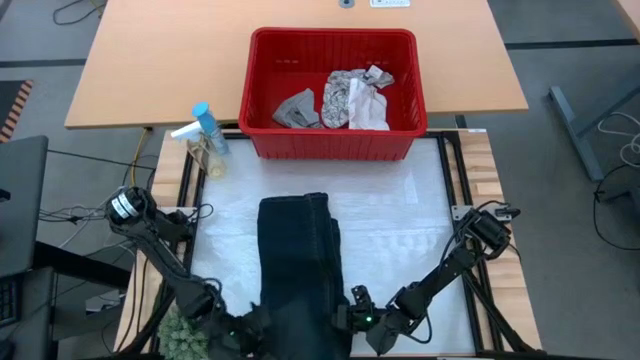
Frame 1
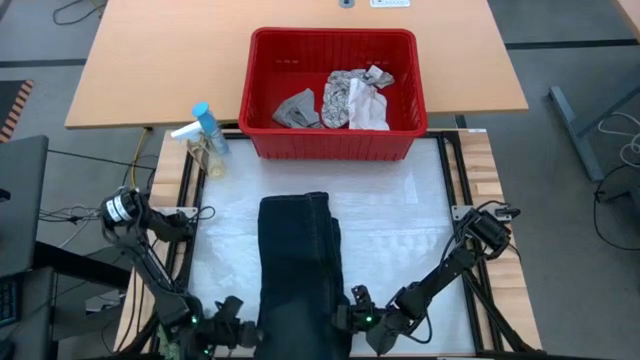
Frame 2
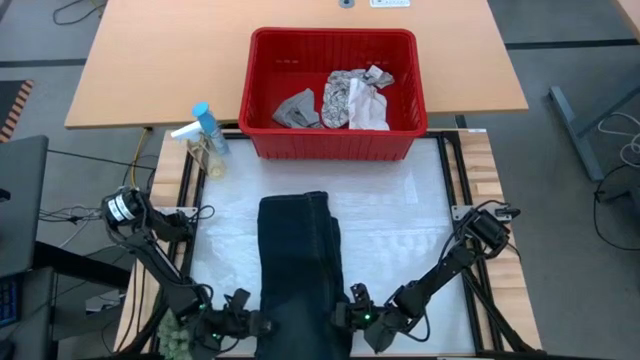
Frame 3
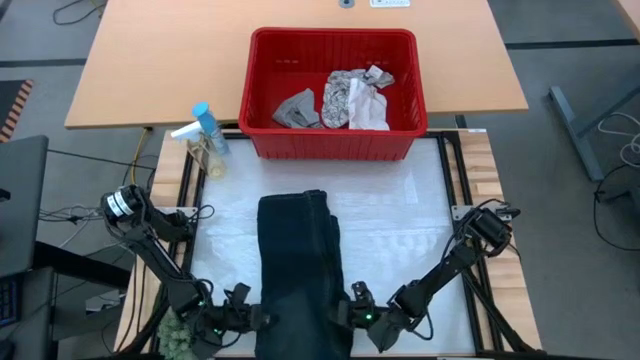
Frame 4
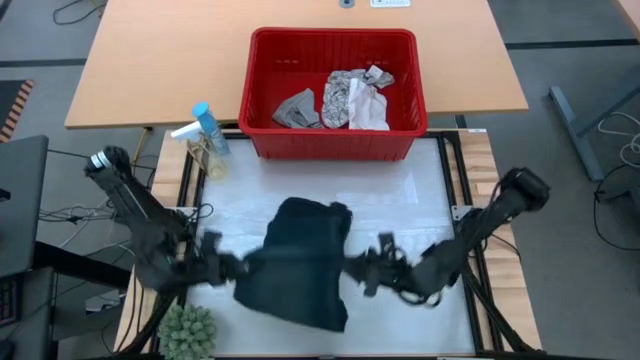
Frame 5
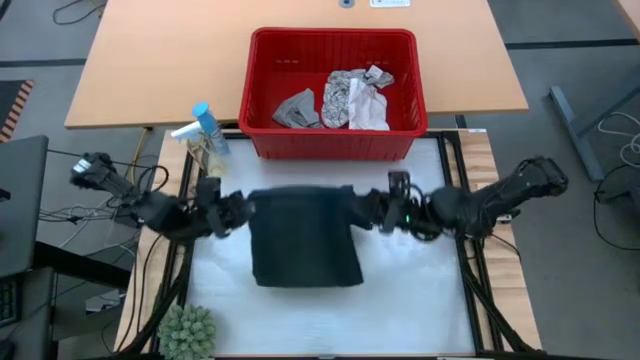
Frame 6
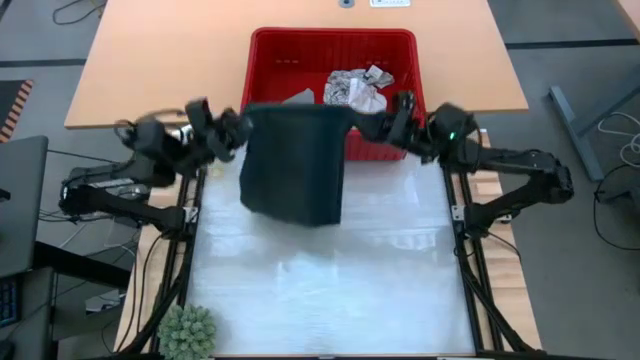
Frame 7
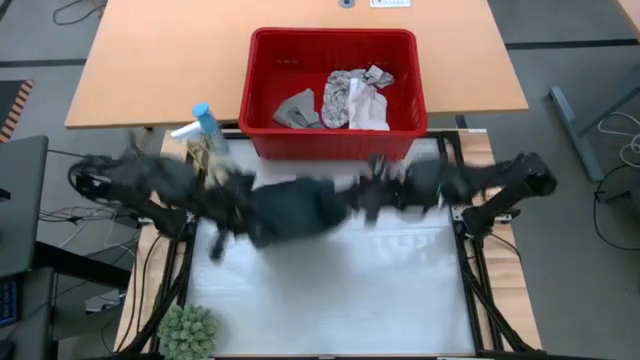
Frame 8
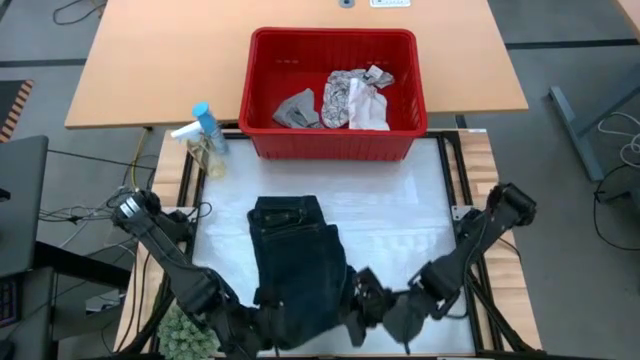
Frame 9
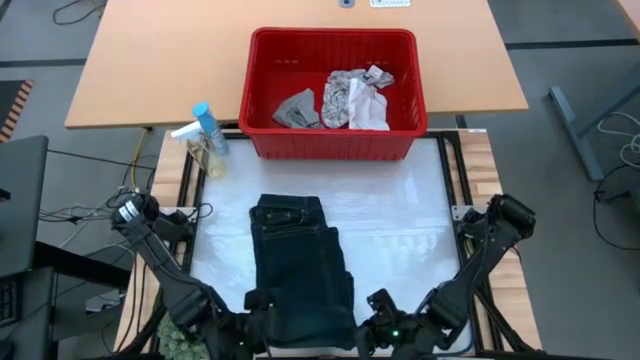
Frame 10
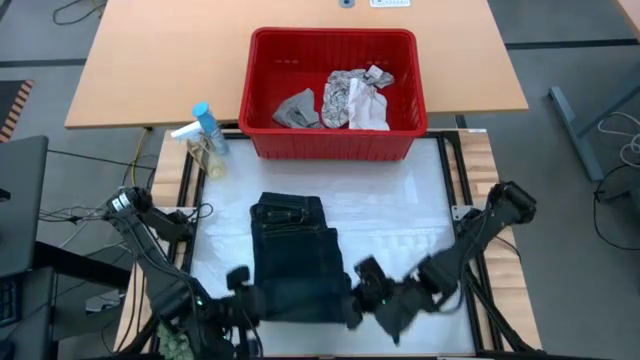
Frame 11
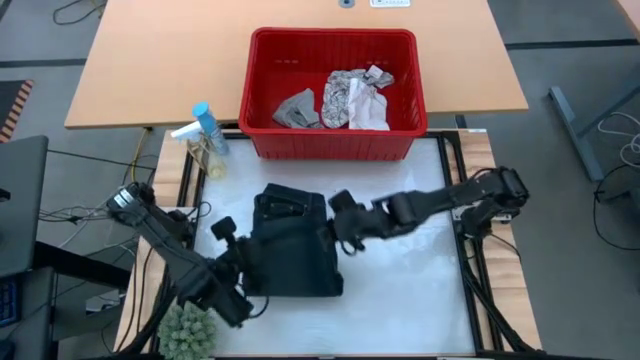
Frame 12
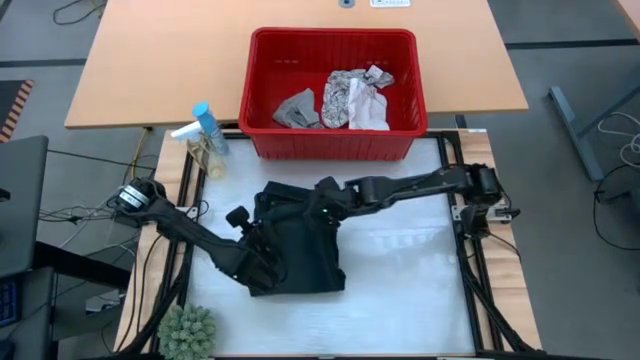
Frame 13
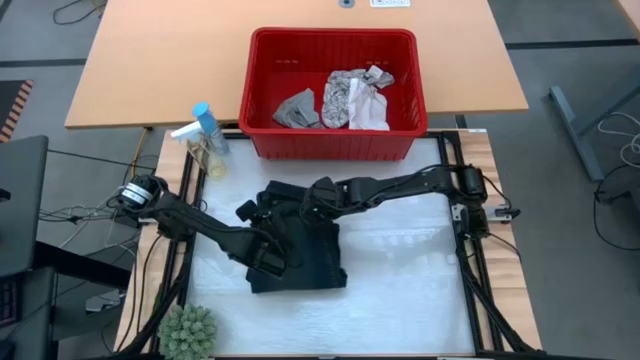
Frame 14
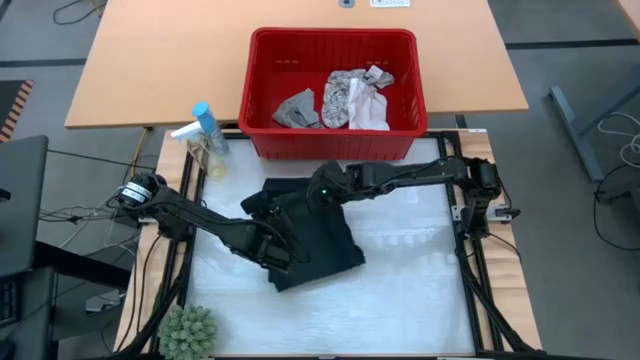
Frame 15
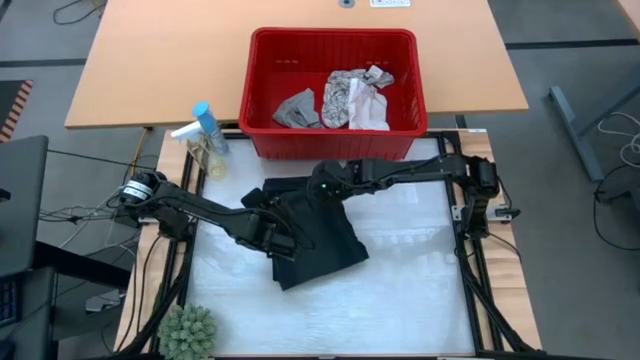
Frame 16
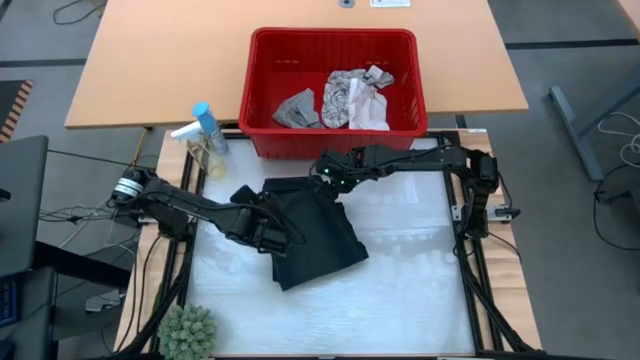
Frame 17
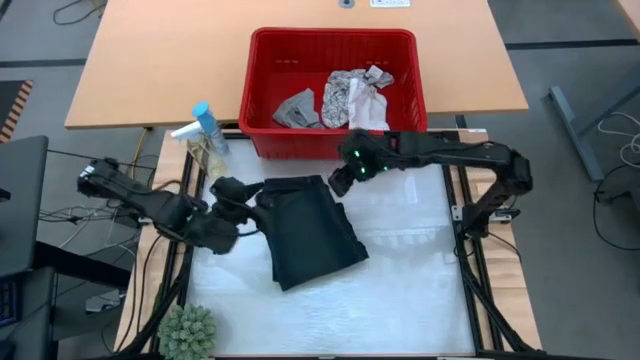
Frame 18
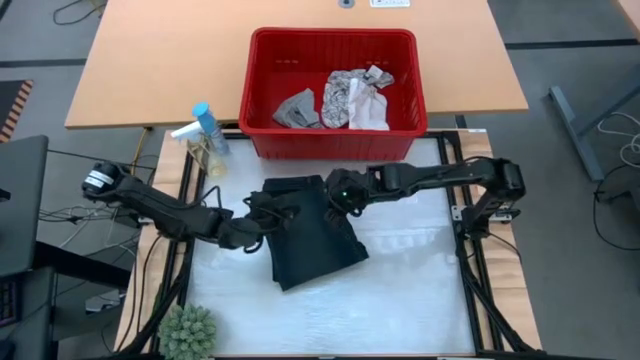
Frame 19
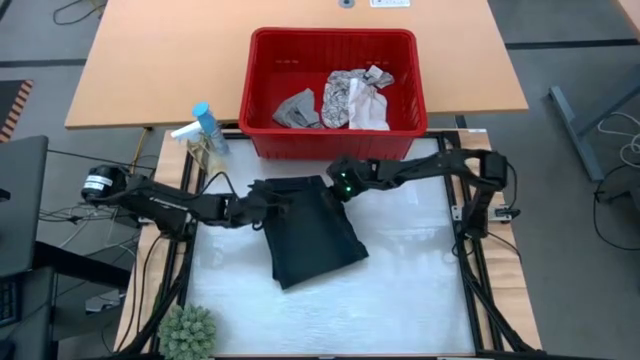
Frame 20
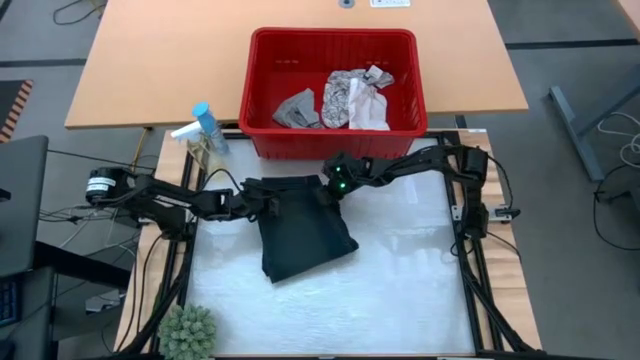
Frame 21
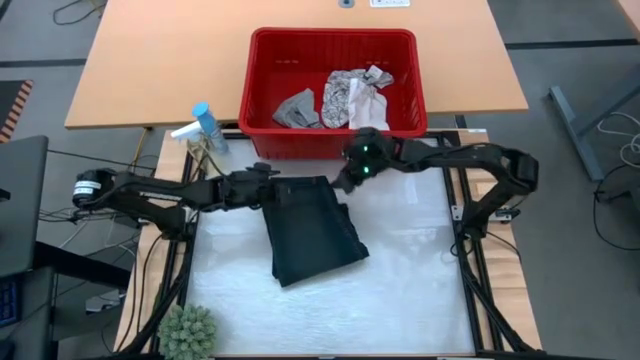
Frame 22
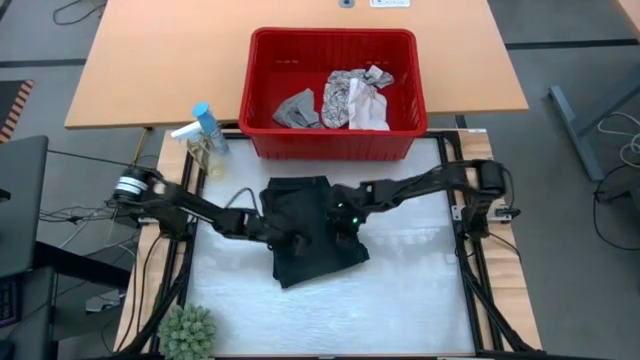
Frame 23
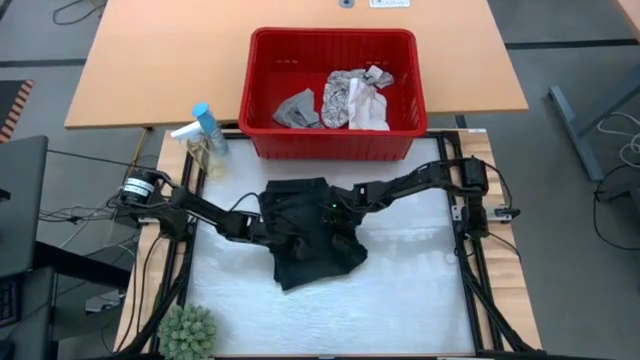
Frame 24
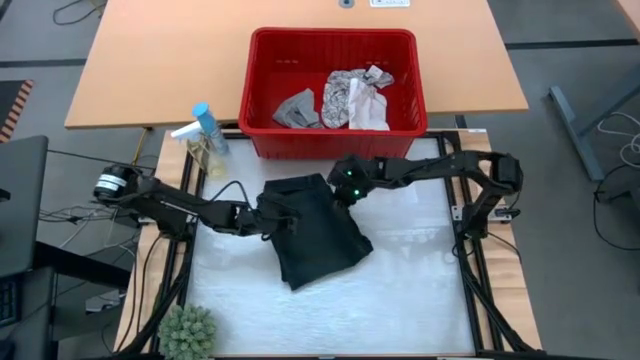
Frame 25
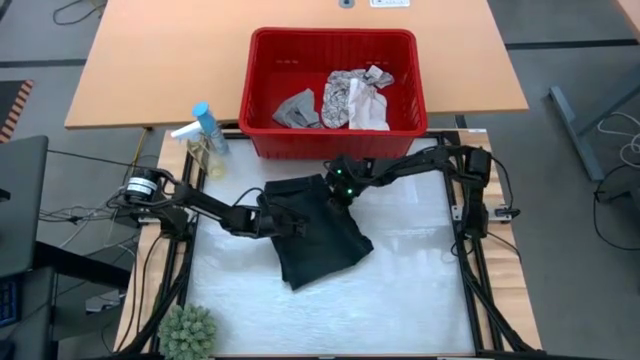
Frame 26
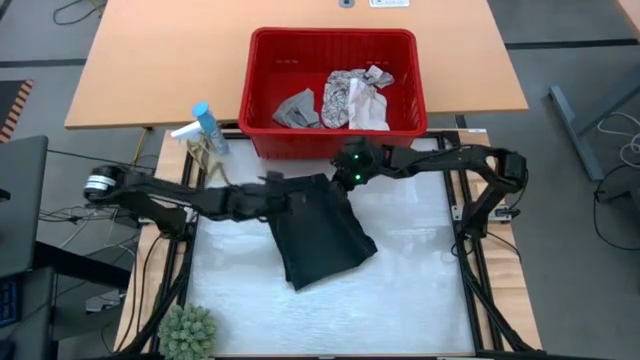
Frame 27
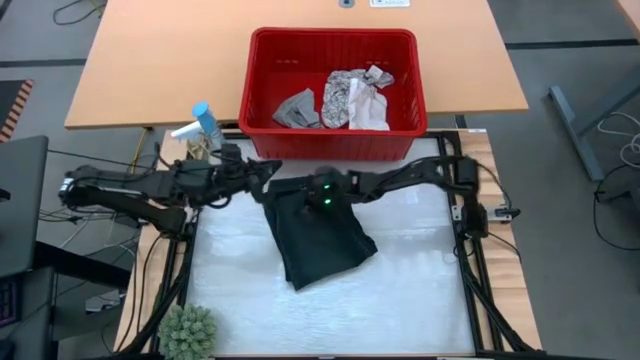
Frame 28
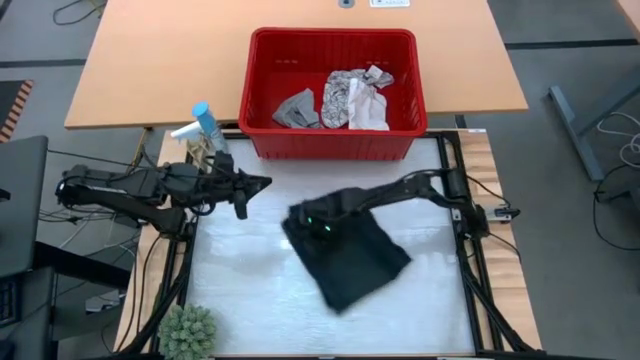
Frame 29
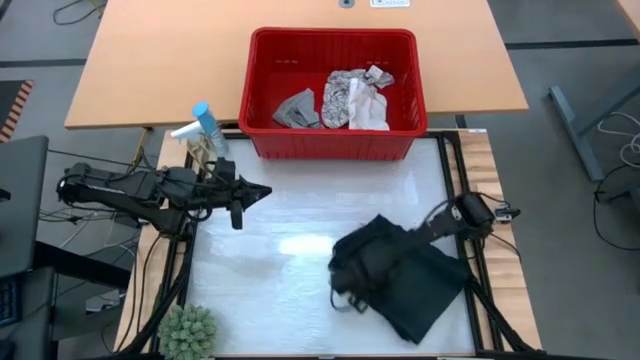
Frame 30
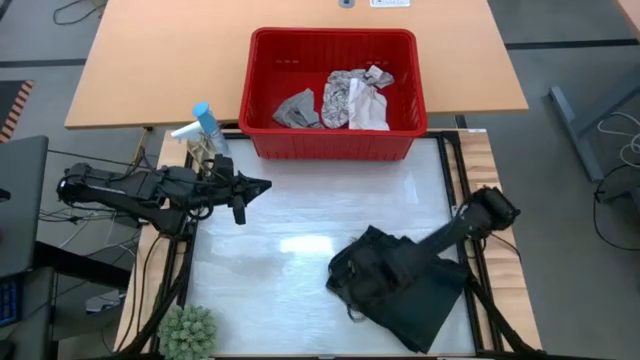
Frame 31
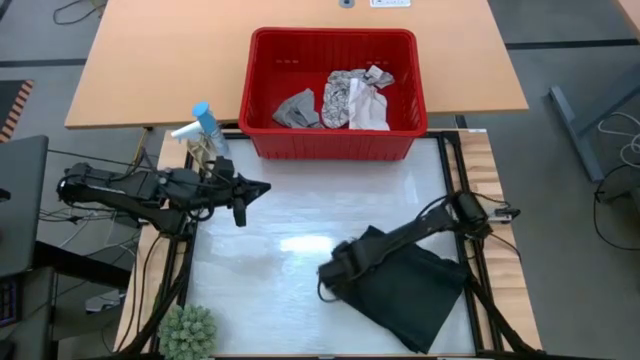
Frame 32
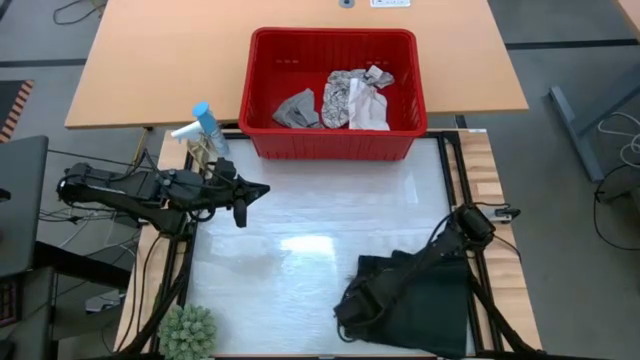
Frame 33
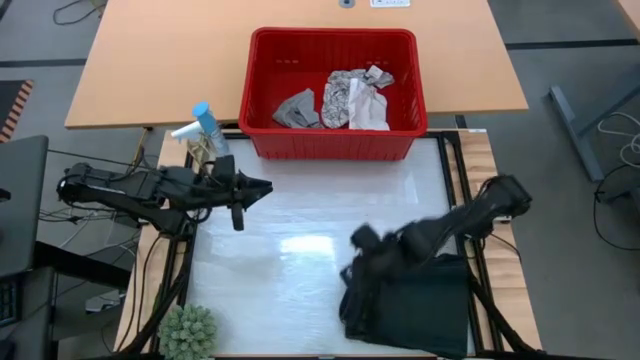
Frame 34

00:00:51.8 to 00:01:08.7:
Task: Fold Laundry from Bin
Fold the blue pants from the red laundry bin

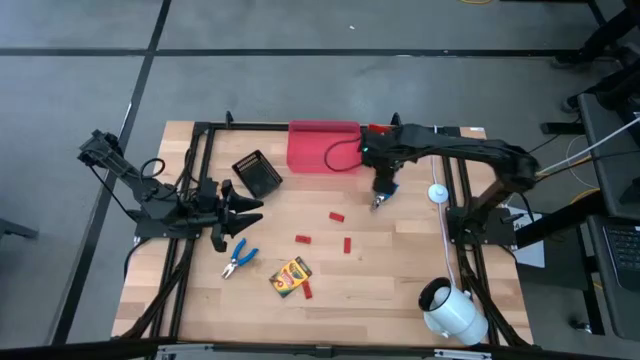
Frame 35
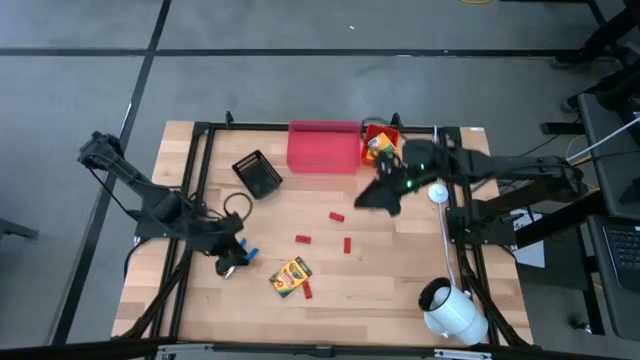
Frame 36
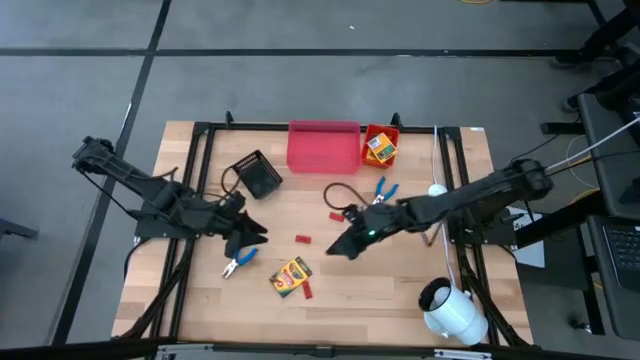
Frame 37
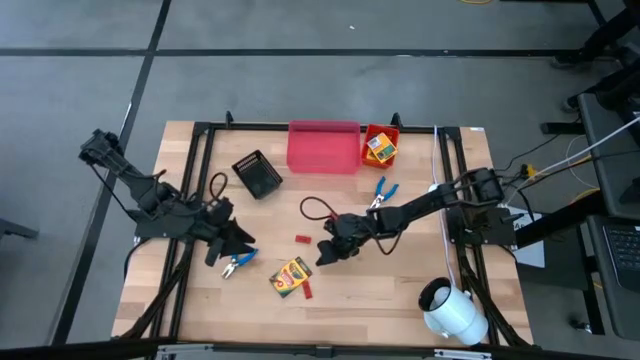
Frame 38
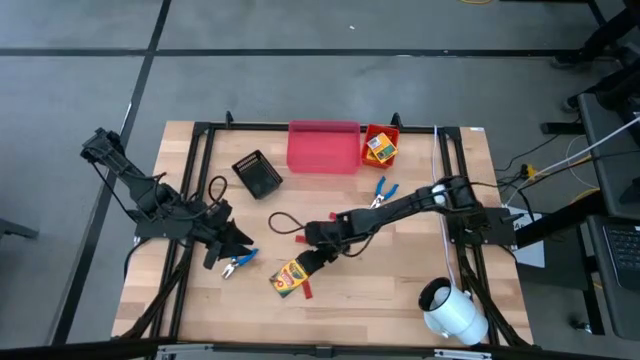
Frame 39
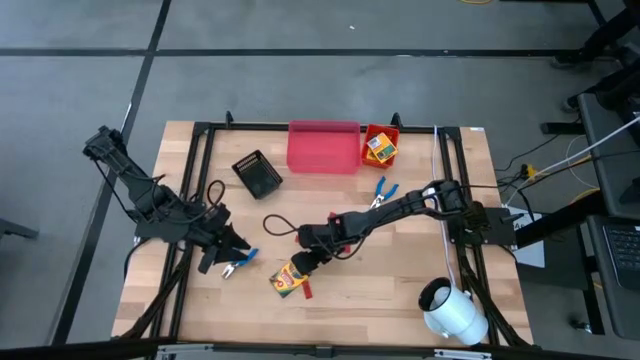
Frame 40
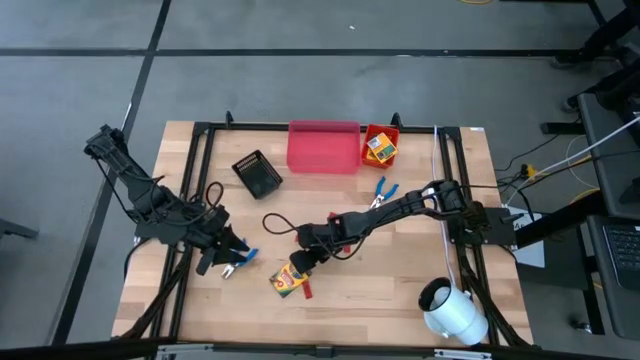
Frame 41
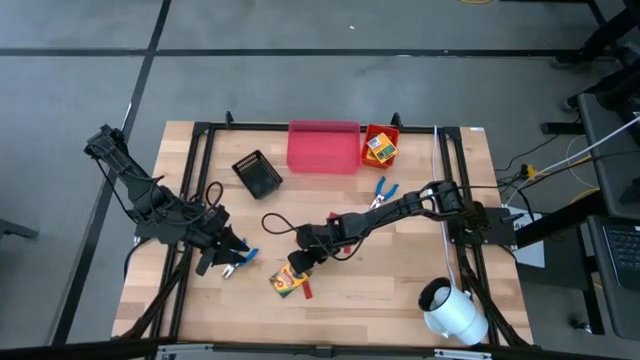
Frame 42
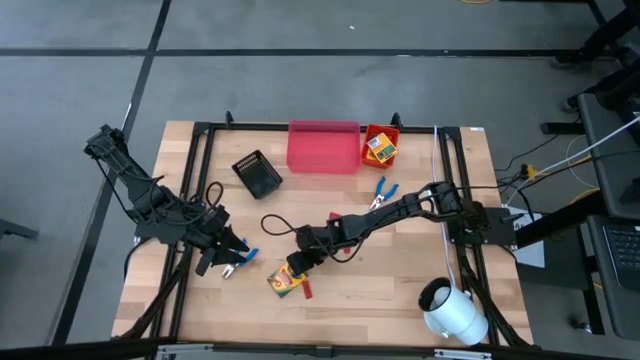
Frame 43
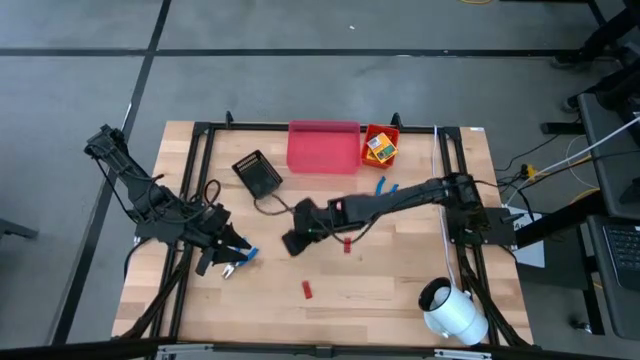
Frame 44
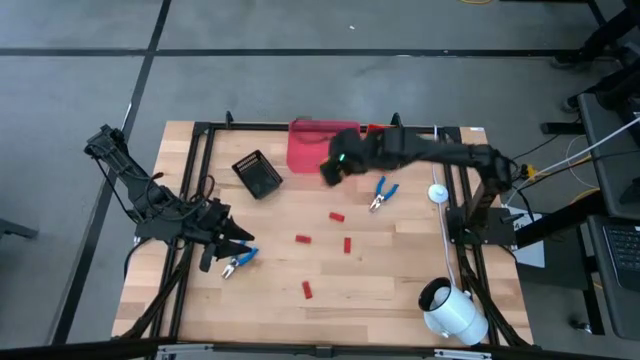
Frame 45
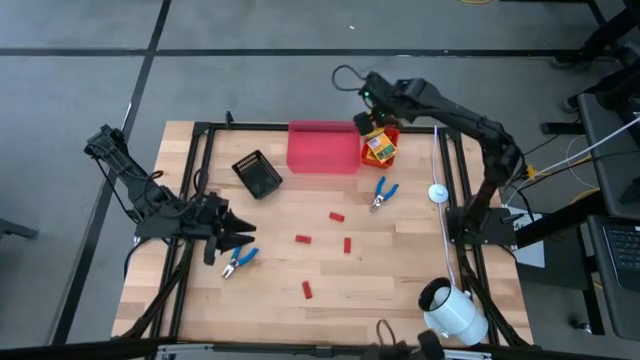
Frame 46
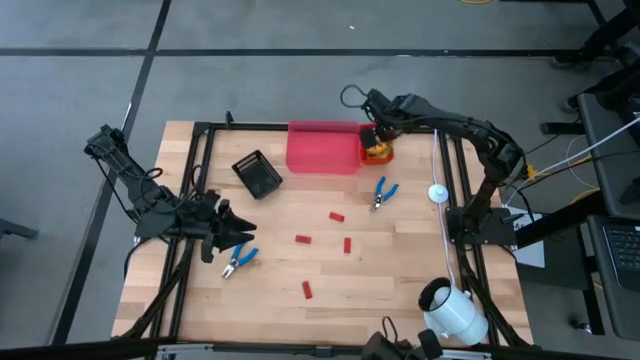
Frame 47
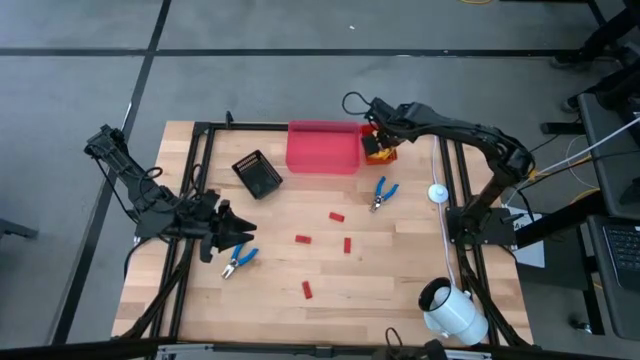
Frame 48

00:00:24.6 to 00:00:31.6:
Task: Pick & Place School Supplies
Put the yellow crayon box into the red bin
